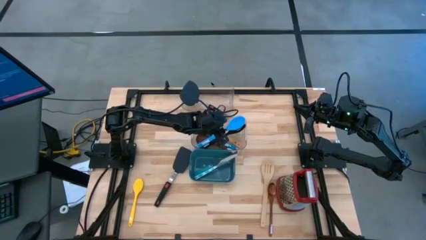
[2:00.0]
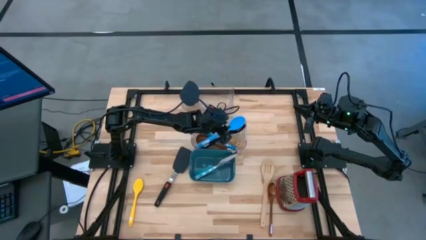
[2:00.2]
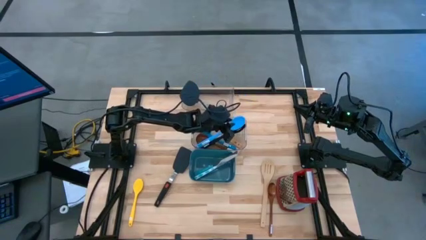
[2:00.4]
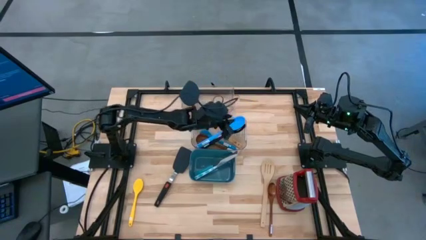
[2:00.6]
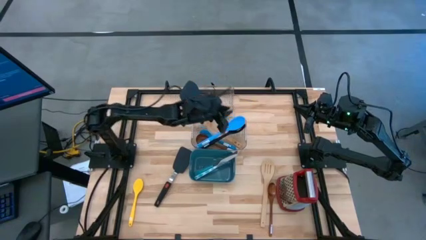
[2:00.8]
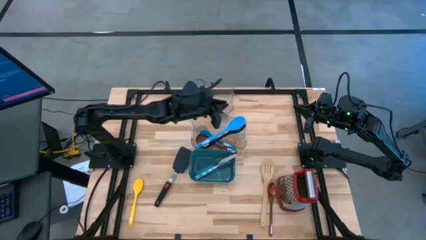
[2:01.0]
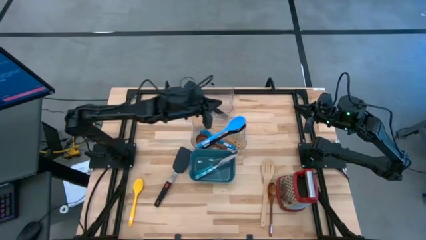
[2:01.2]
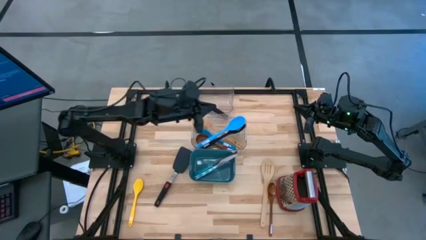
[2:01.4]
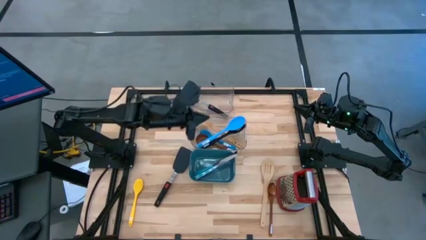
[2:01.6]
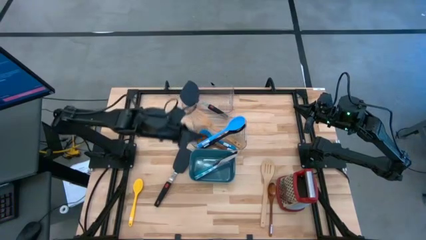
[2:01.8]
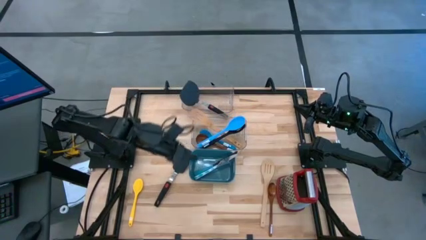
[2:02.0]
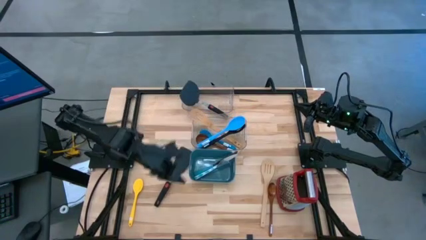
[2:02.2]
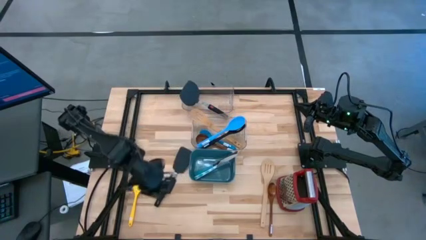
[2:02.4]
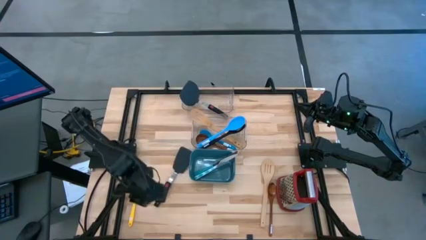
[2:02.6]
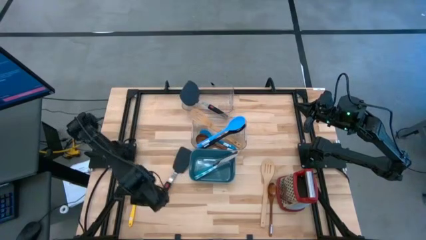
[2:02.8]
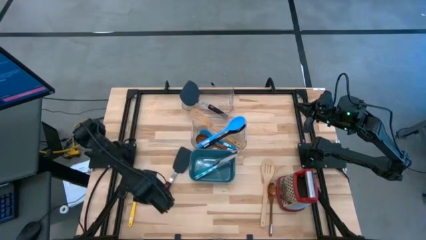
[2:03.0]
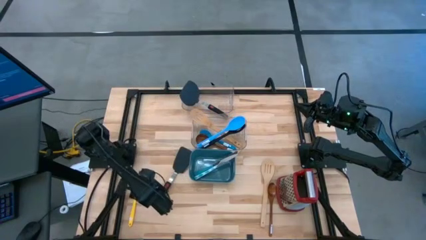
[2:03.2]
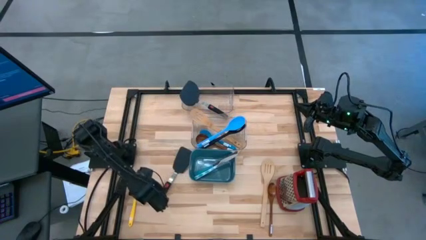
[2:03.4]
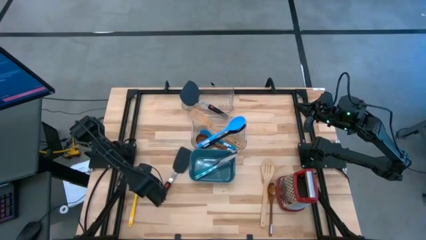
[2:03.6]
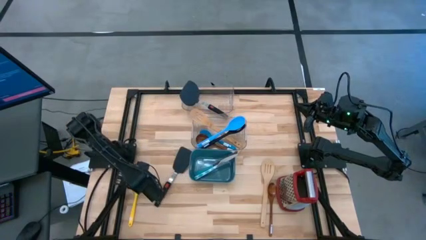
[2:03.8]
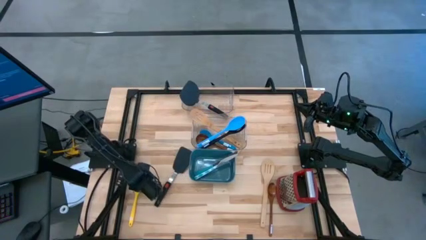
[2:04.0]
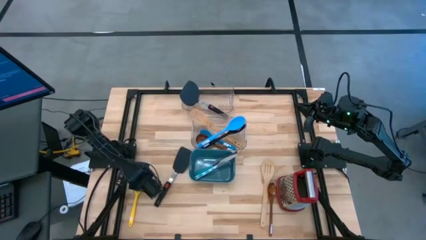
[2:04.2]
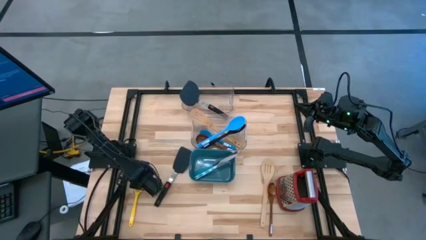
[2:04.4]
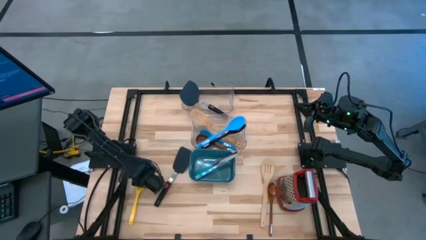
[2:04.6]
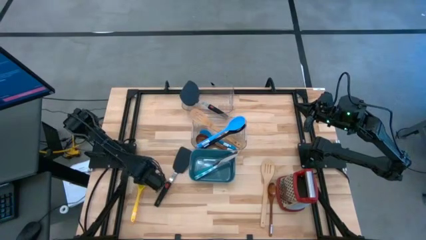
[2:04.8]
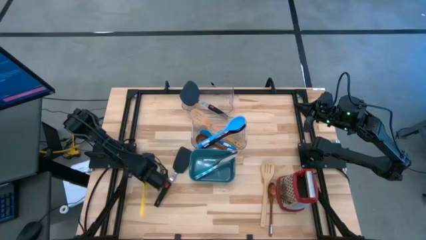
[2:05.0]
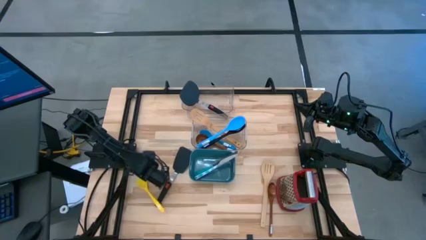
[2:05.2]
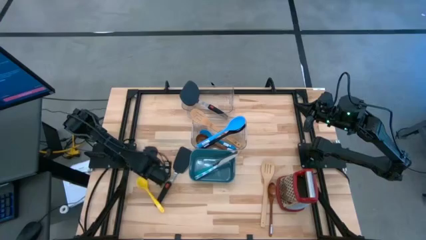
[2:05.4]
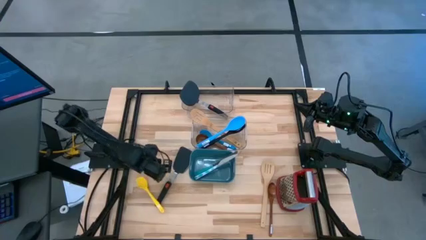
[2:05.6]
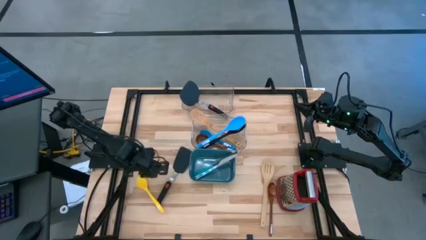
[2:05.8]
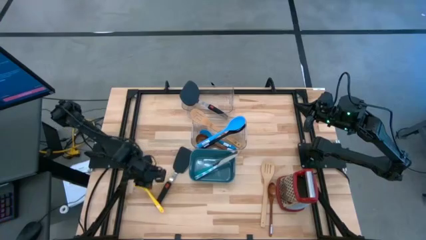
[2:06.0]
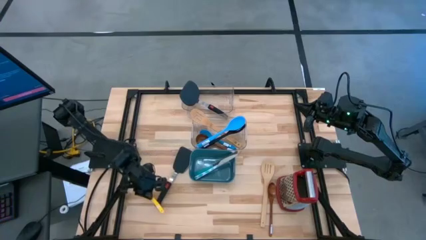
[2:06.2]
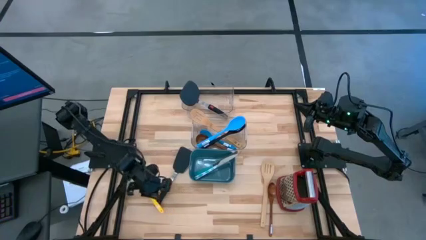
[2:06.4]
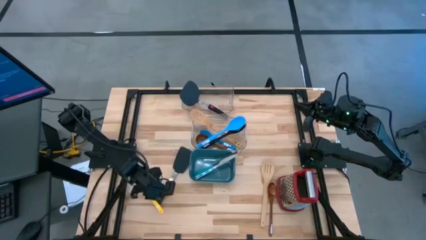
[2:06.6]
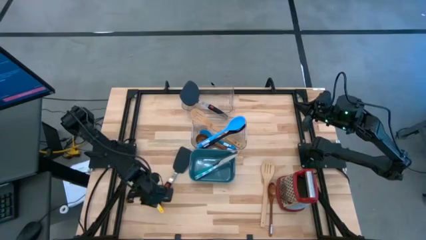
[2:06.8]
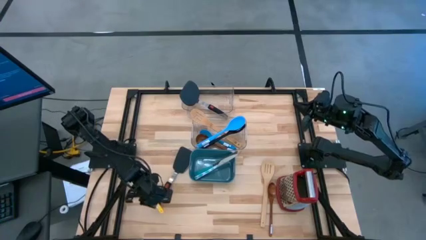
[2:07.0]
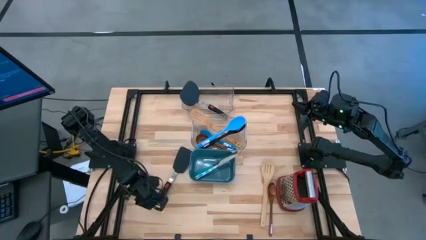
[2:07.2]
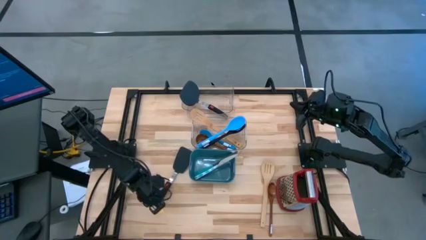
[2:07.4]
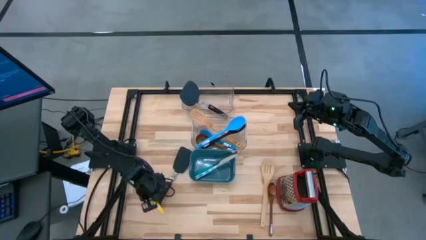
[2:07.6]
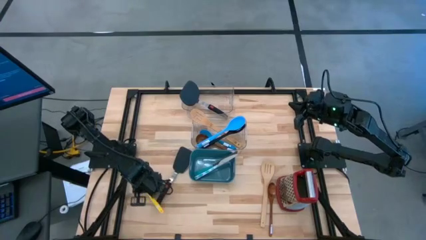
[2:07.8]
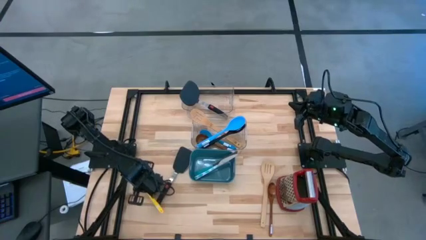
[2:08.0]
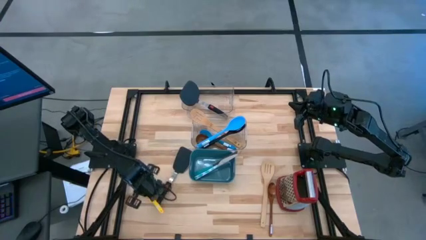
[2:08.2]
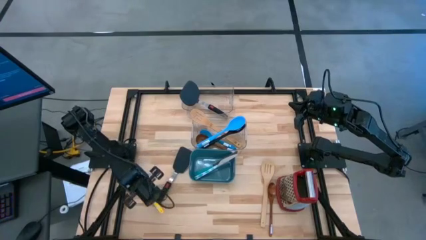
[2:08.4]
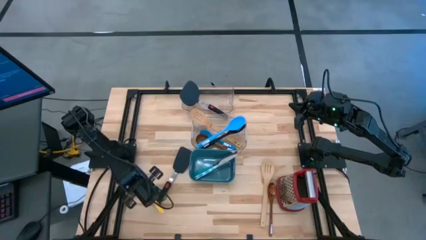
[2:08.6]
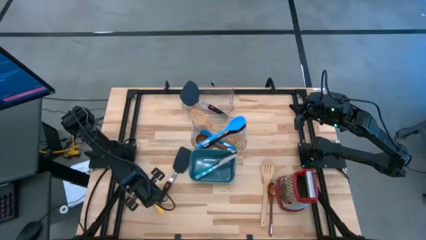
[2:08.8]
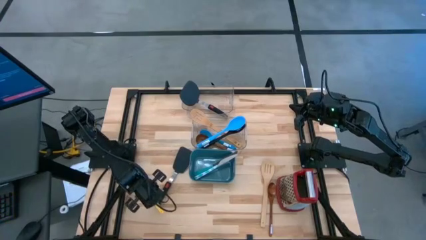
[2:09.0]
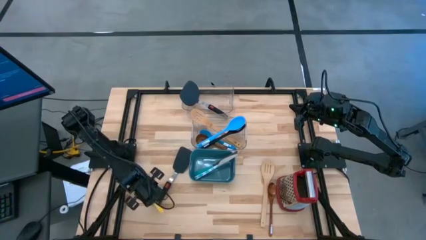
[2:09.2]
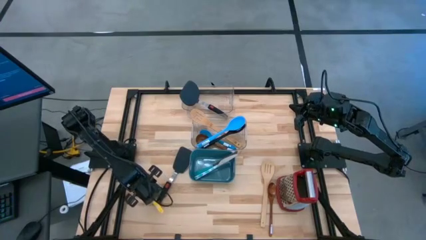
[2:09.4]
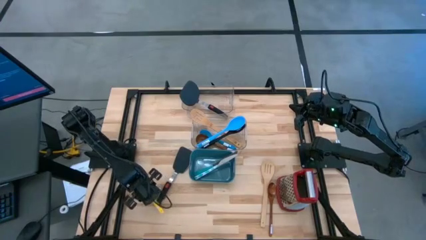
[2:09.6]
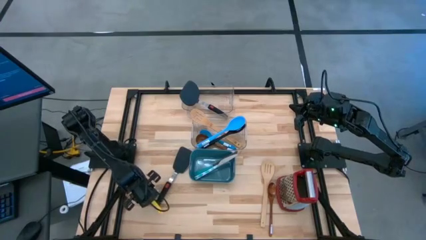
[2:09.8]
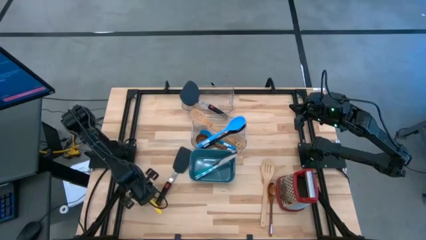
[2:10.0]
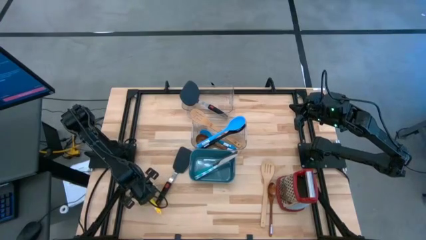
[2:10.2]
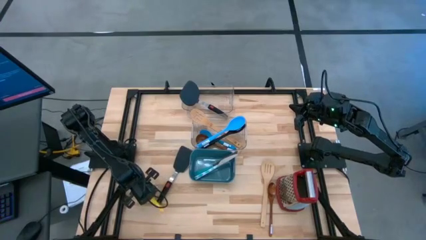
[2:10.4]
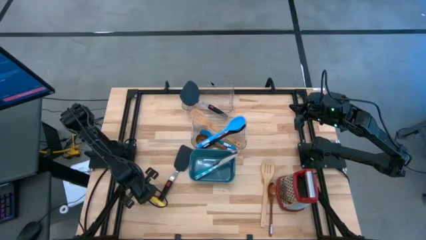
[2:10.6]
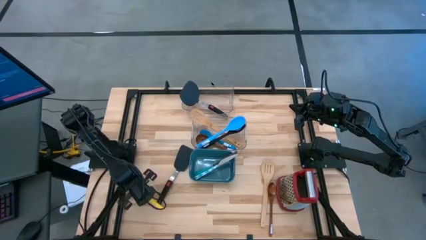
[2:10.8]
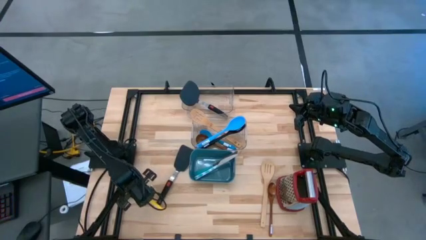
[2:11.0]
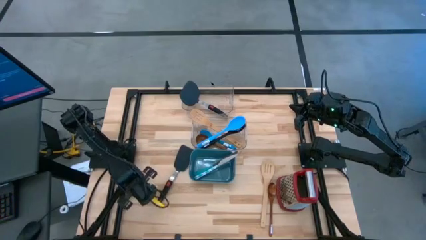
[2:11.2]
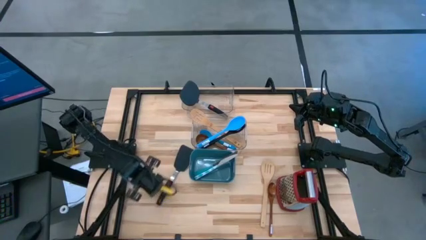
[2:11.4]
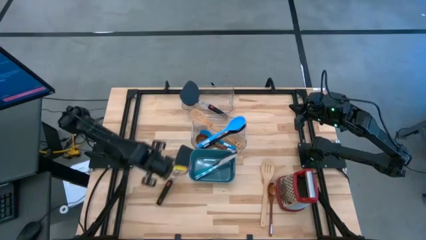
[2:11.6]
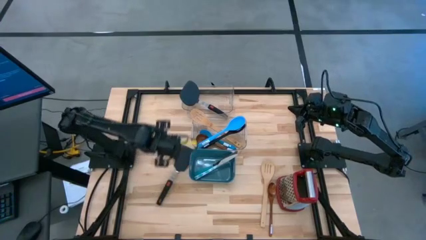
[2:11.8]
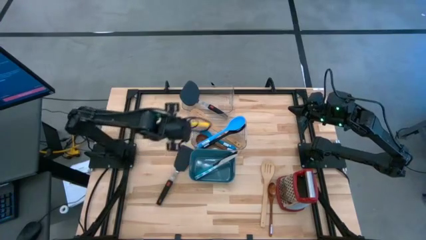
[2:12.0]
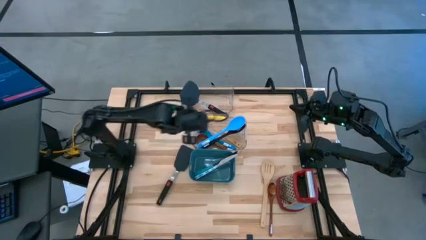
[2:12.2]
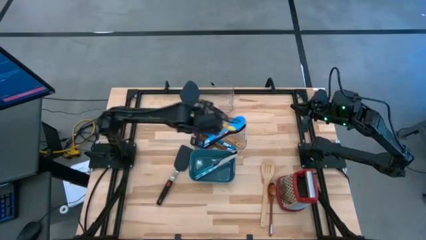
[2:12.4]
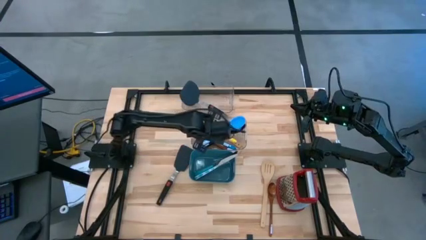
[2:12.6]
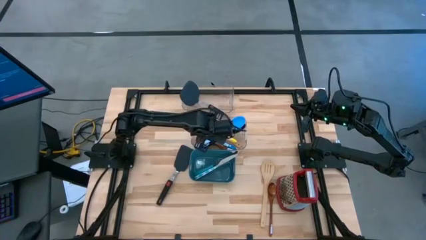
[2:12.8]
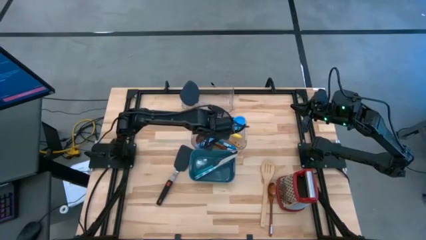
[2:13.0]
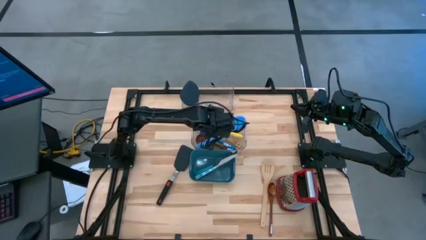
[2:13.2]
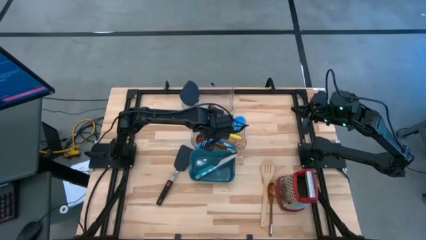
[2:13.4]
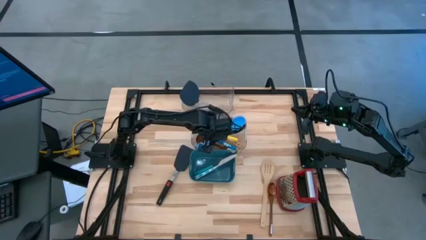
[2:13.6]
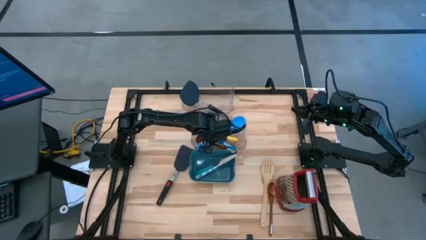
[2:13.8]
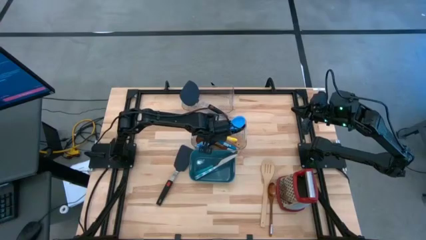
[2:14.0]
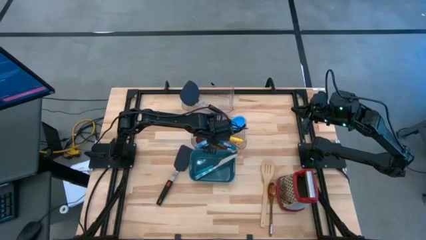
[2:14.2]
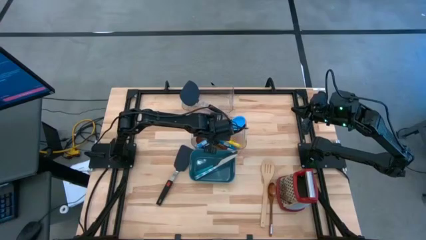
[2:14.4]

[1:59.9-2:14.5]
Task: Pick & Place Kitchen Items
Put the yellow serving spoon into the bottom transparent bin
